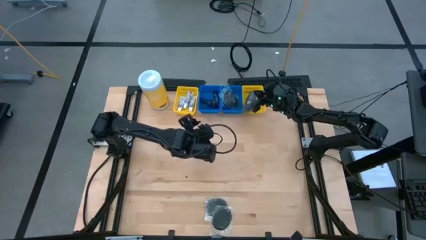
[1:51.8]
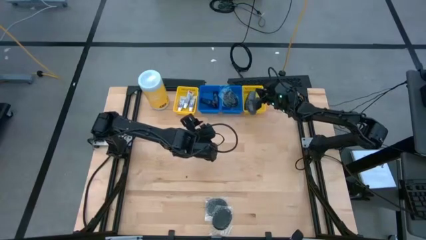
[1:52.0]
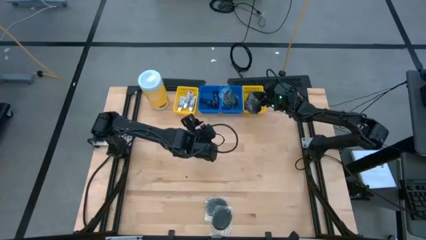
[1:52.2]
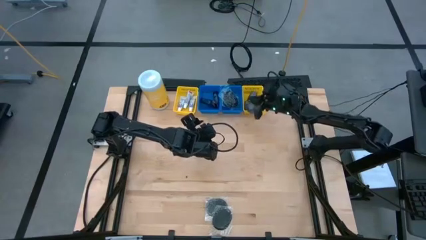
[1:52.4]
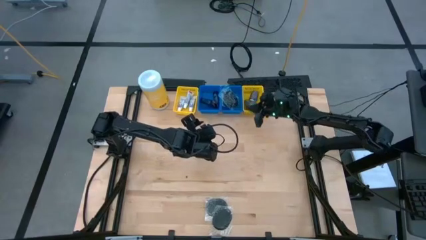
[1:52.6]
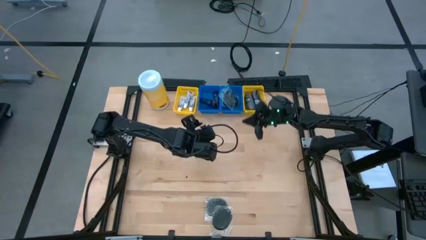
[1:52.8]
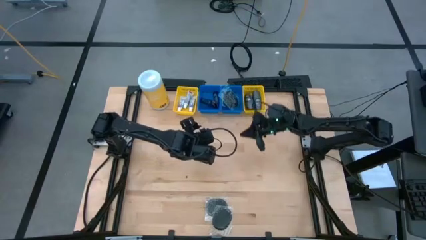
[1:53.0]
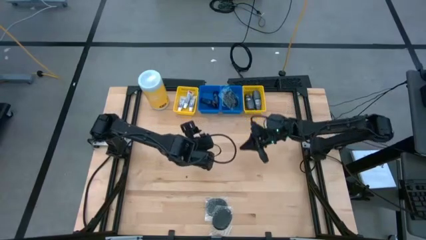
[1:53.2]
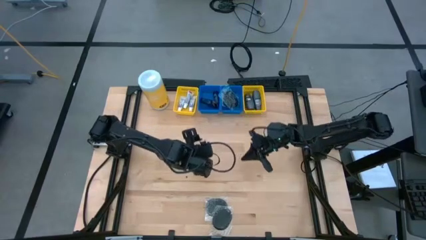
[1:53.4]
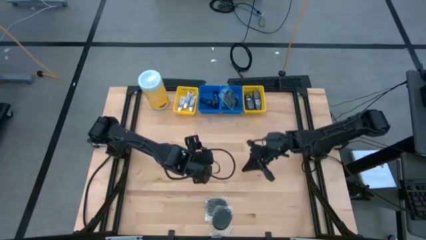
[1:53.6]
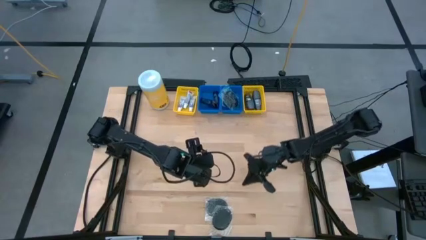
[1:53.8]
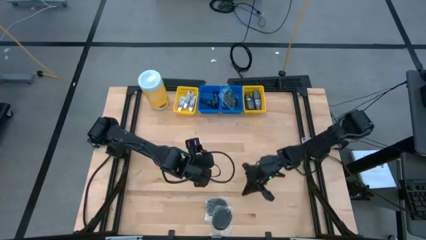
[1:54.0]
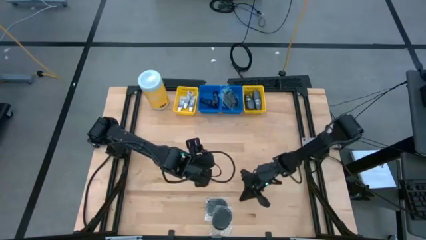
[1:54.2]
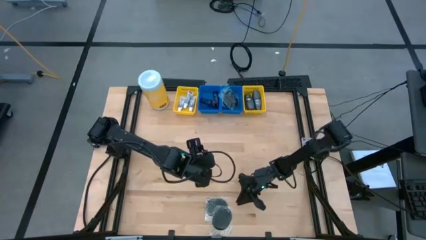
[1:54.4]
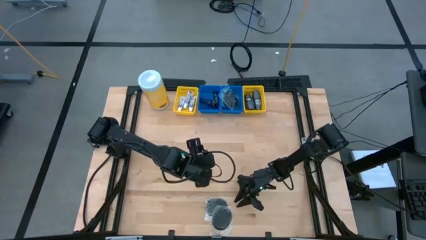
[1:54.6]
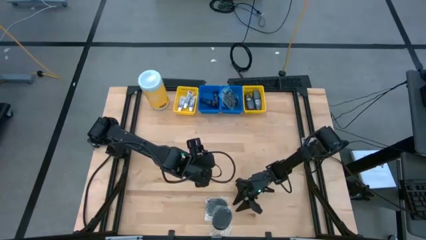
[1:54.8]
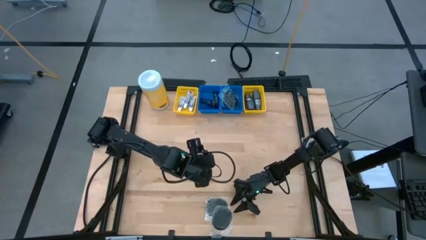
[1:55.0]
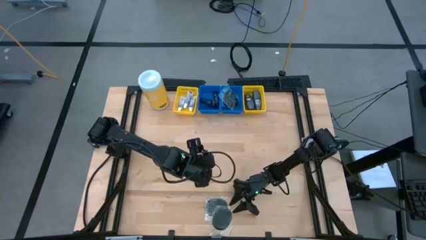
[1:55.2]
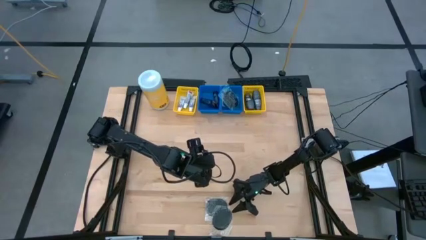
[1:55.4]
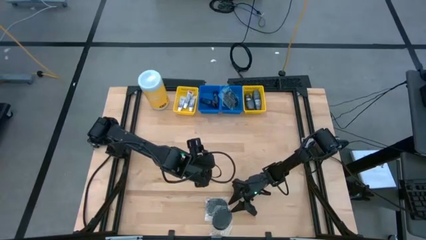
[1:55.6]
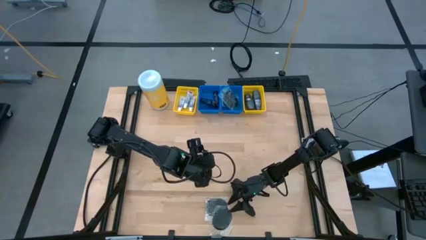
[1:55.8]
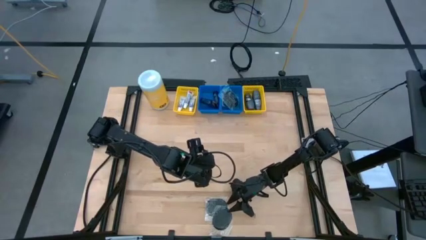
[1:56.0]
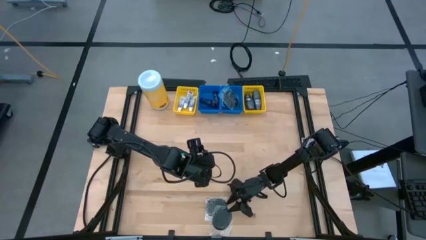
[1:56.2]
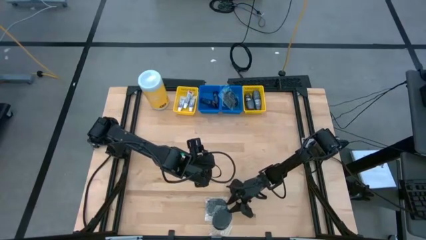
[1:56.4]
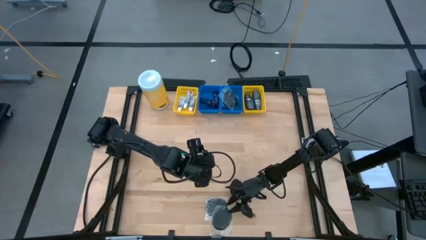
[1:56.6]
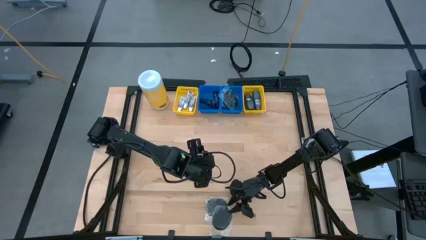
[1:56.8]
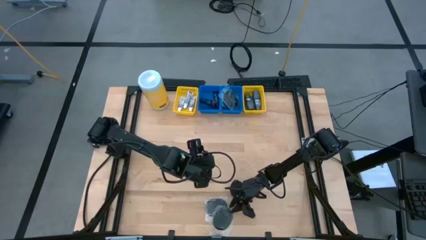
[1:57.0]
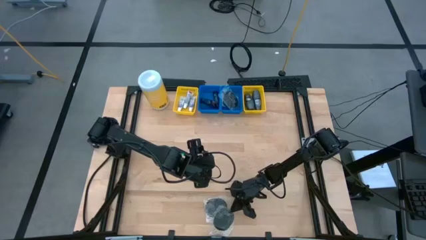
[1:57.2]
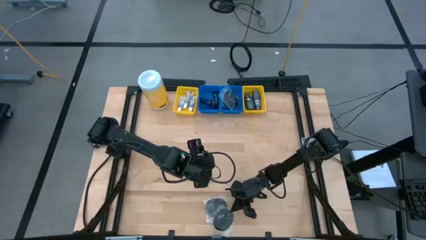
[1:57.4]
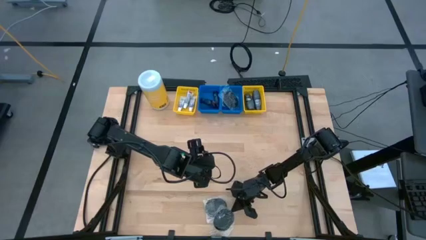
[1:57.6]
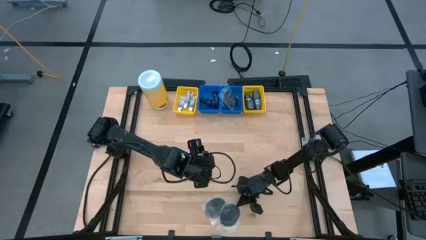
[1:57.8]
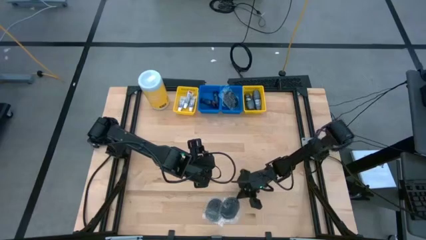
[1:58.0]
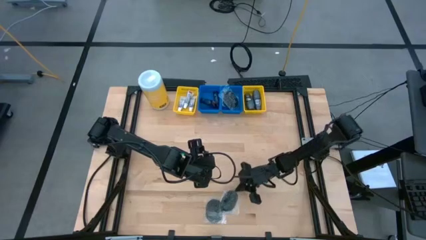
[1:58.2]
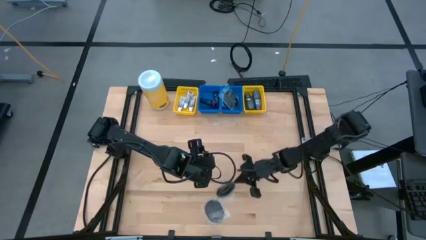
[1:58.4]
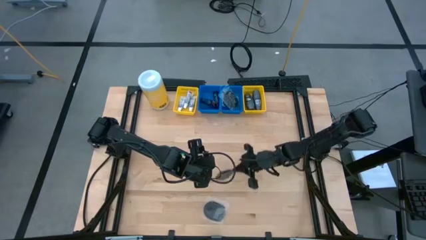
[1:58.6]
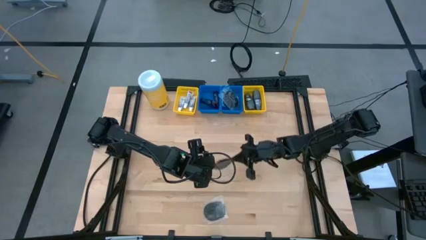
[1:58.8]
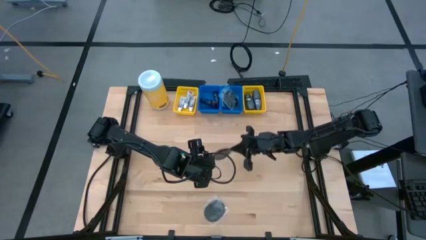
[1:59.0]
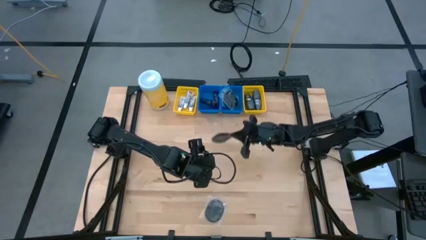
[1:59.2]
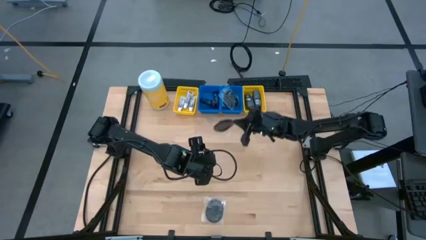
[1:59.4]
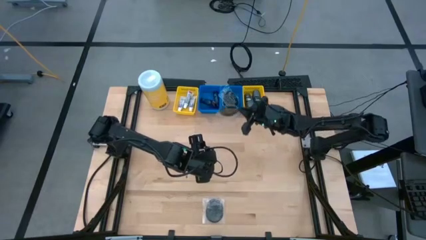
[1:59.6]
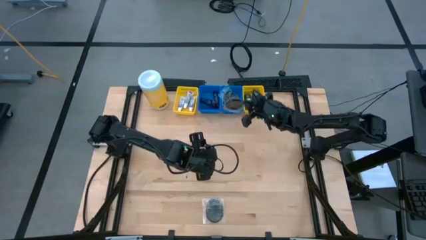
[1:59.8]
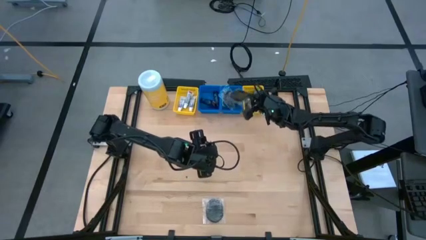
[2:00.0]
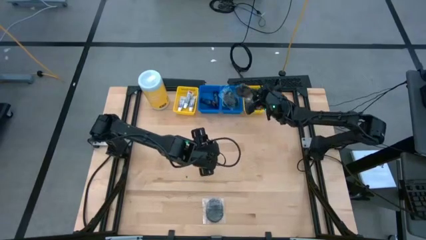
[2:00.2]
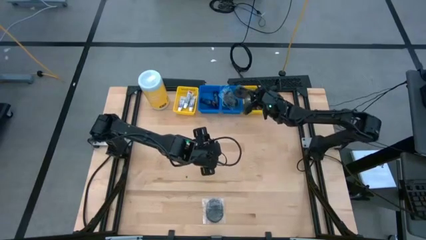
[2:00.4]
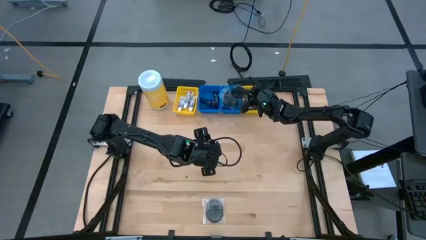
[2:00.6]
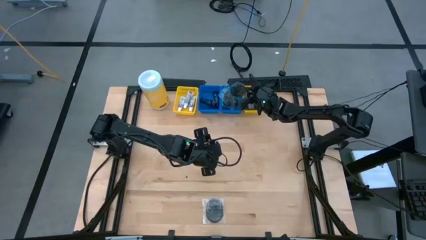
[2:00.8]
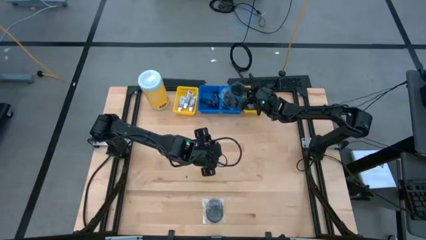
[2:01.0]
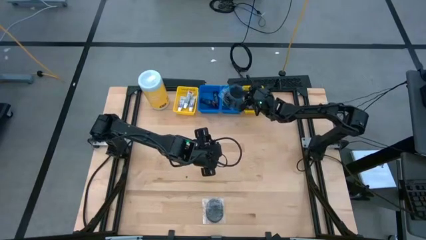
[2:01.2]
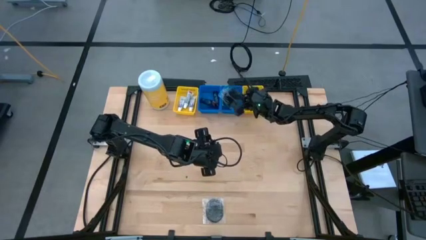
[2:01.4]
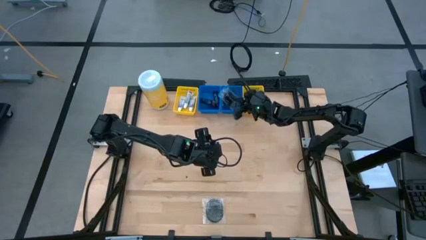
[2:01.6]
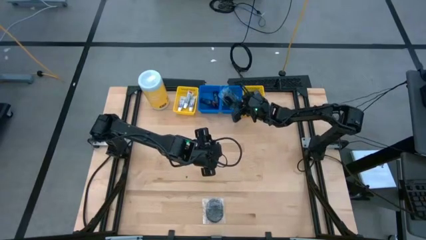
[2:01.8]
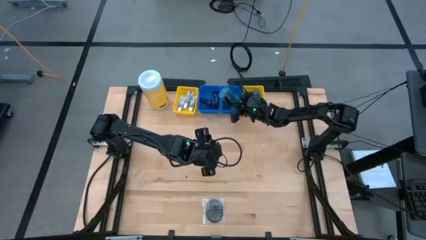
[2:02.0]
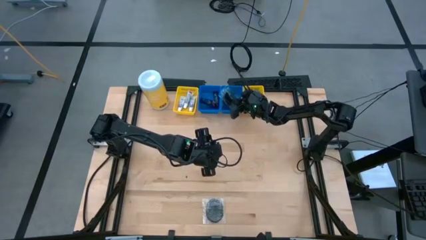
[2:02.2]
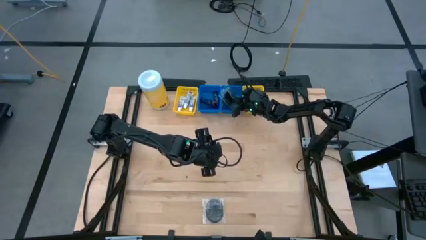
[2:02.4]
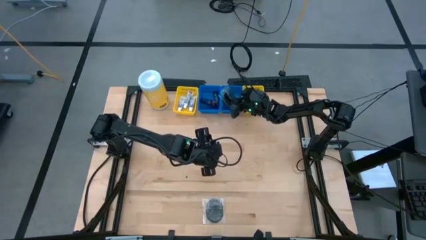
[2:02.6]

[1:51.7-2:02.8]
Task: Pick & Place Travel size toiletries
Put the hairbrush into the right blue bin
